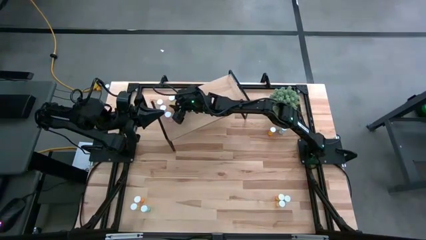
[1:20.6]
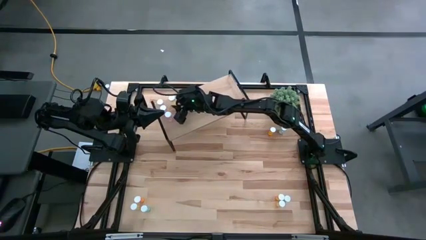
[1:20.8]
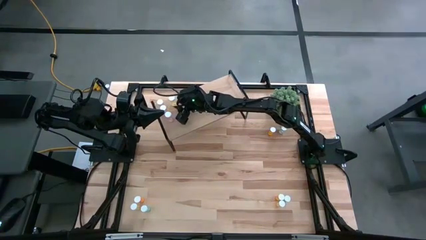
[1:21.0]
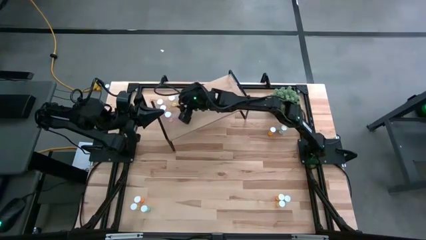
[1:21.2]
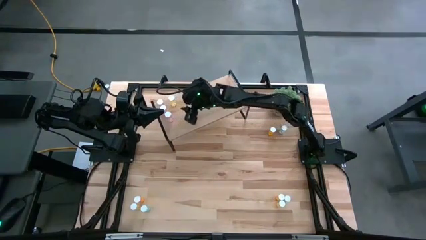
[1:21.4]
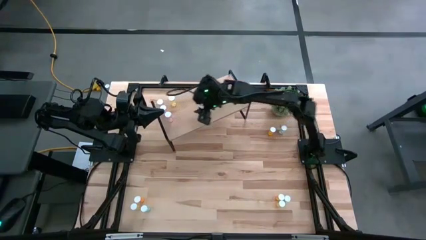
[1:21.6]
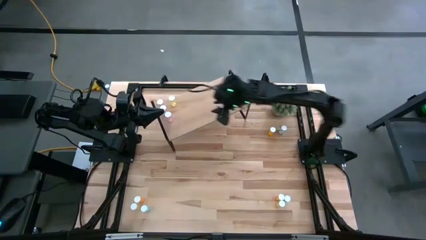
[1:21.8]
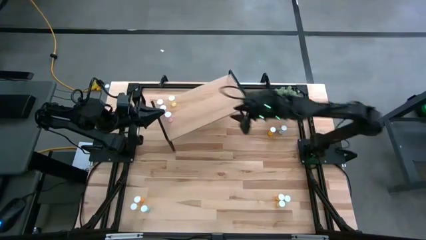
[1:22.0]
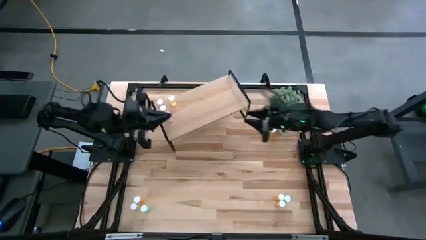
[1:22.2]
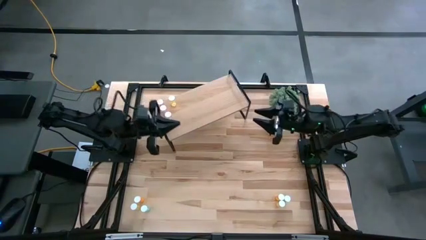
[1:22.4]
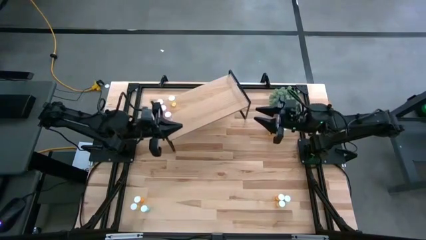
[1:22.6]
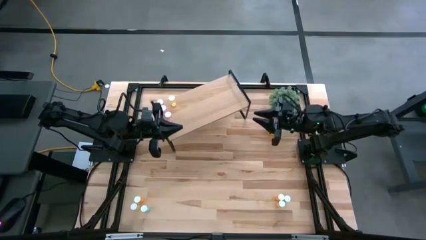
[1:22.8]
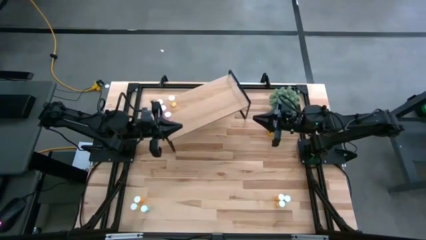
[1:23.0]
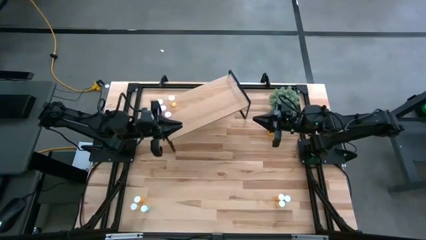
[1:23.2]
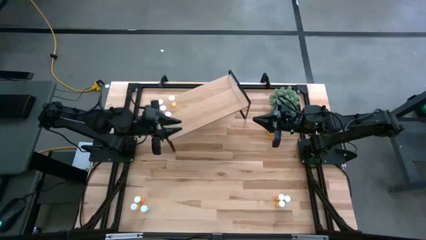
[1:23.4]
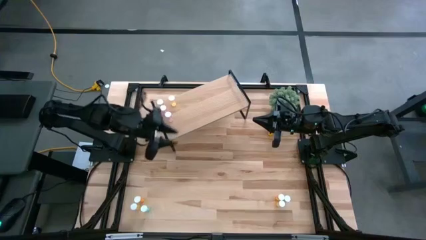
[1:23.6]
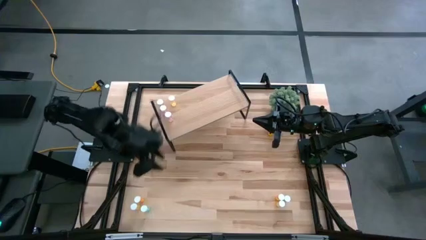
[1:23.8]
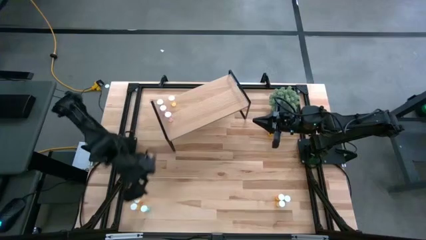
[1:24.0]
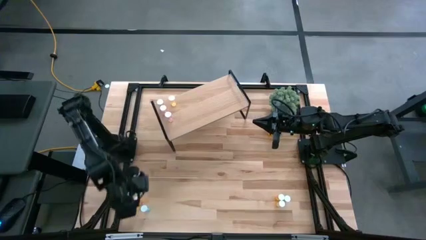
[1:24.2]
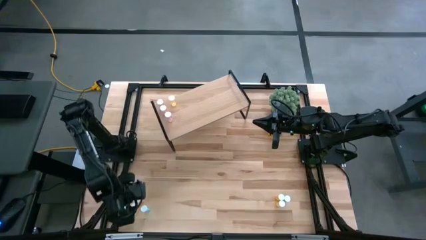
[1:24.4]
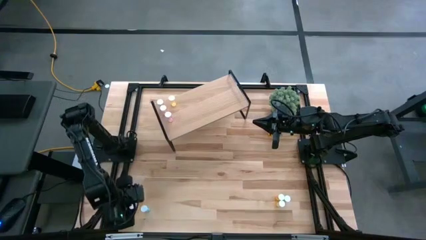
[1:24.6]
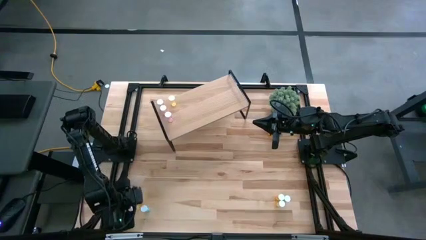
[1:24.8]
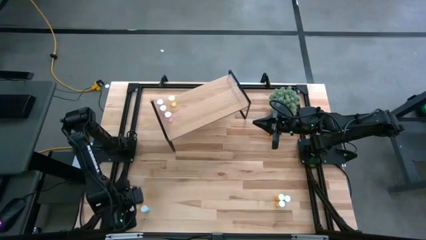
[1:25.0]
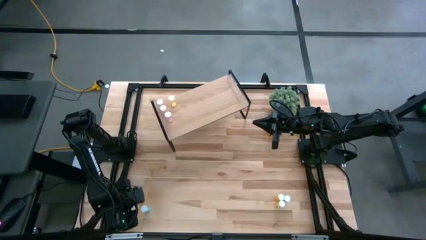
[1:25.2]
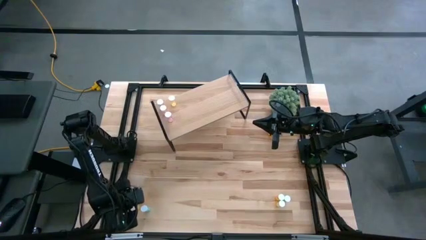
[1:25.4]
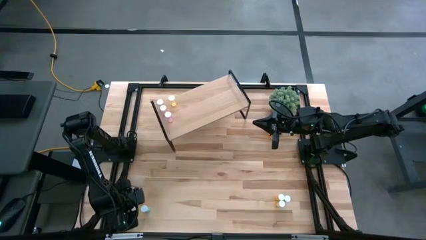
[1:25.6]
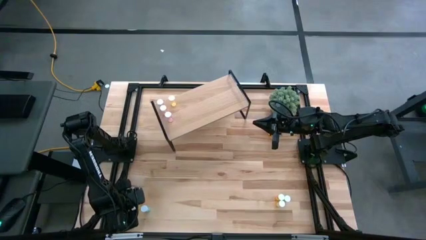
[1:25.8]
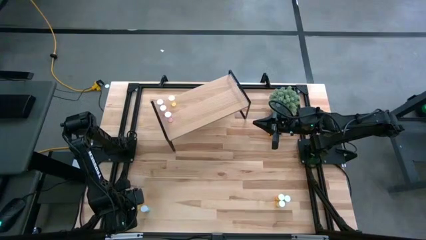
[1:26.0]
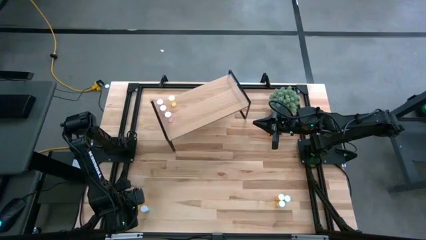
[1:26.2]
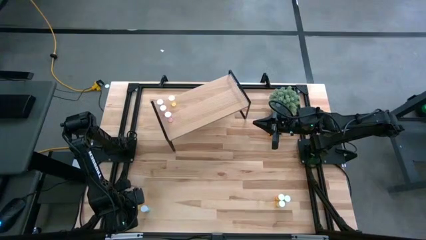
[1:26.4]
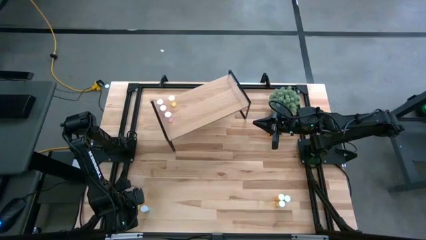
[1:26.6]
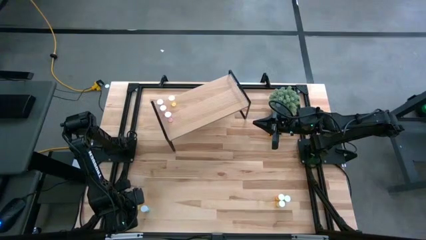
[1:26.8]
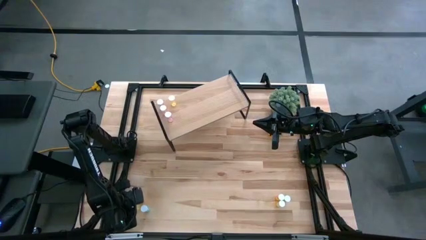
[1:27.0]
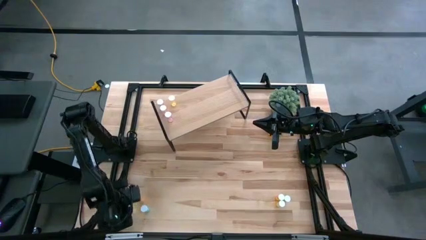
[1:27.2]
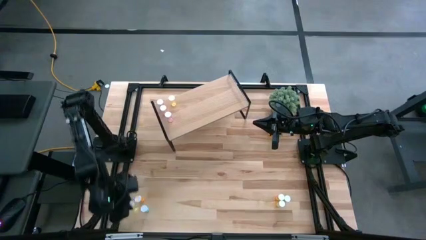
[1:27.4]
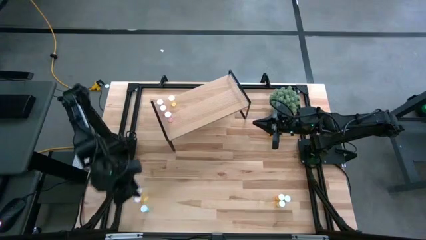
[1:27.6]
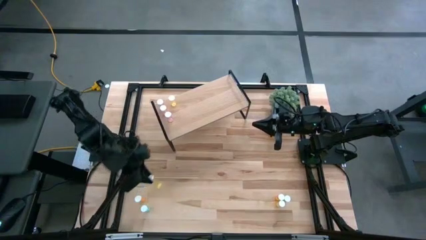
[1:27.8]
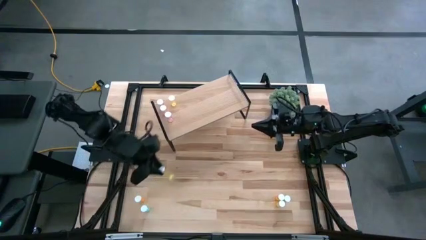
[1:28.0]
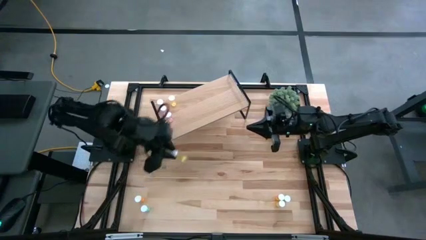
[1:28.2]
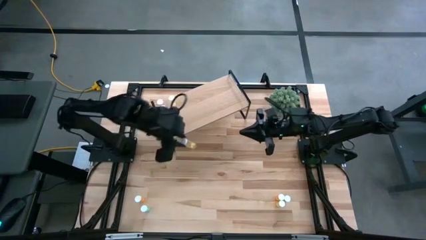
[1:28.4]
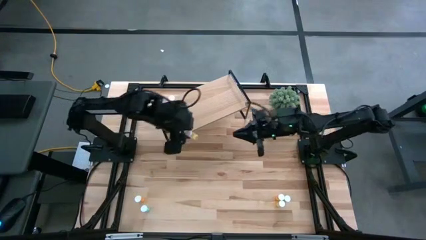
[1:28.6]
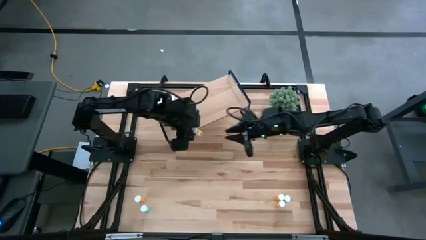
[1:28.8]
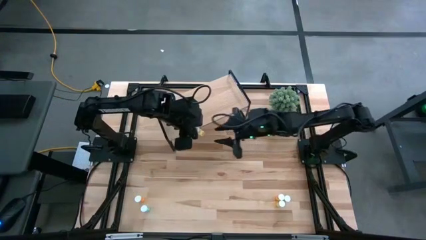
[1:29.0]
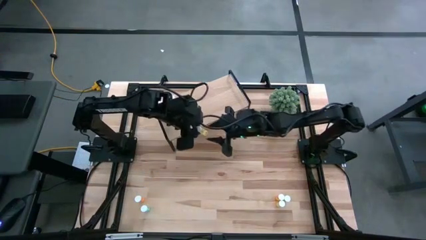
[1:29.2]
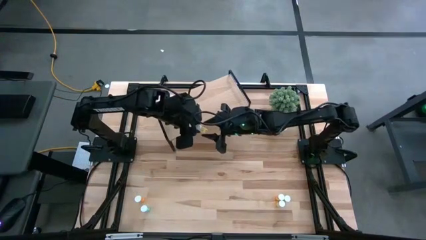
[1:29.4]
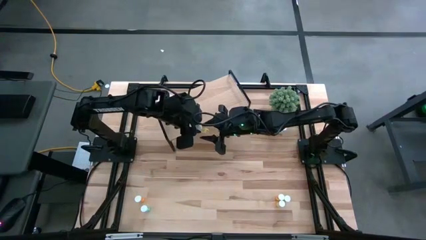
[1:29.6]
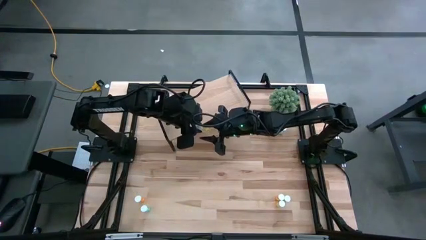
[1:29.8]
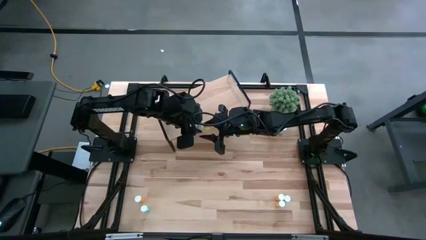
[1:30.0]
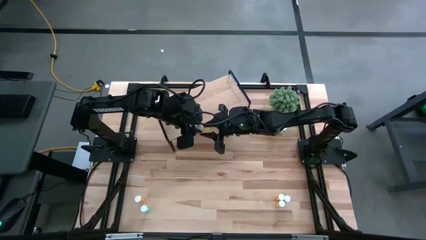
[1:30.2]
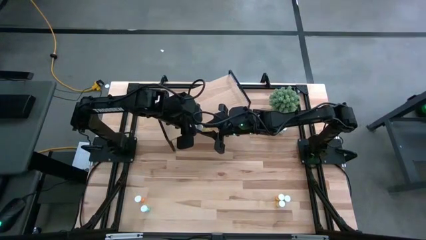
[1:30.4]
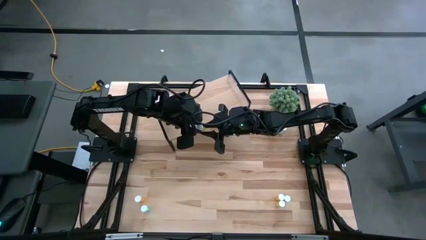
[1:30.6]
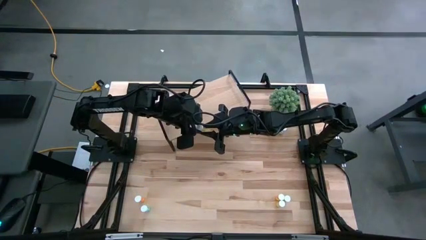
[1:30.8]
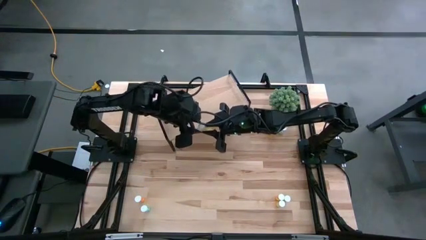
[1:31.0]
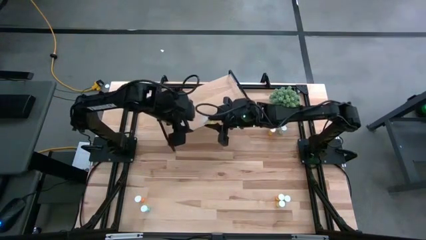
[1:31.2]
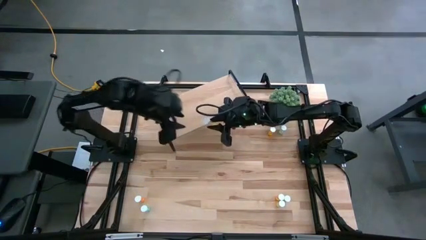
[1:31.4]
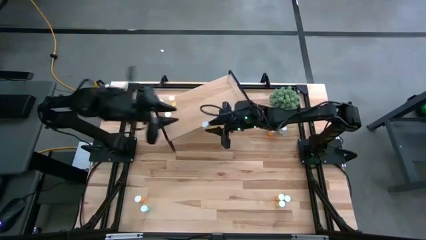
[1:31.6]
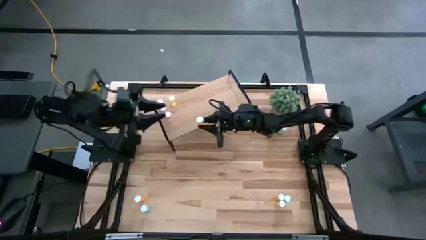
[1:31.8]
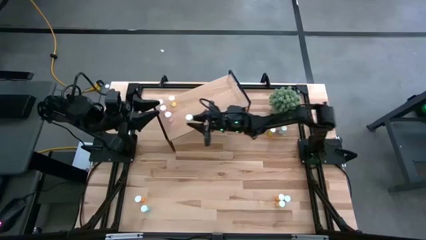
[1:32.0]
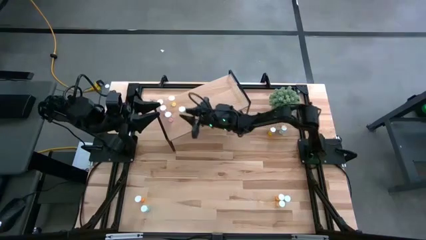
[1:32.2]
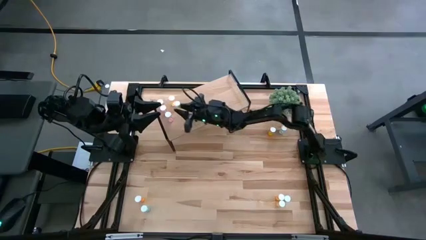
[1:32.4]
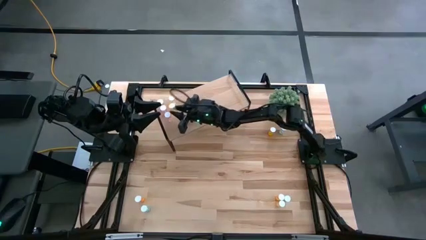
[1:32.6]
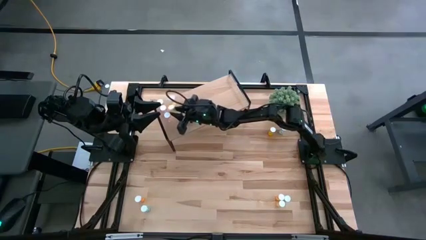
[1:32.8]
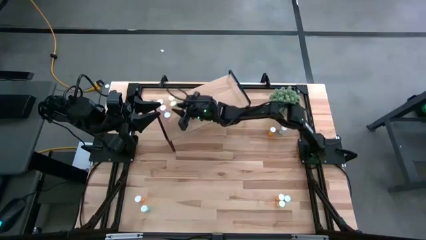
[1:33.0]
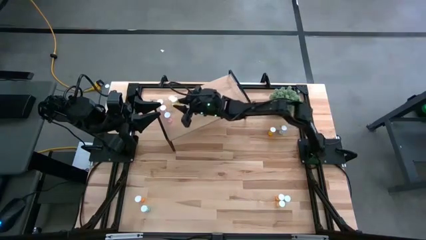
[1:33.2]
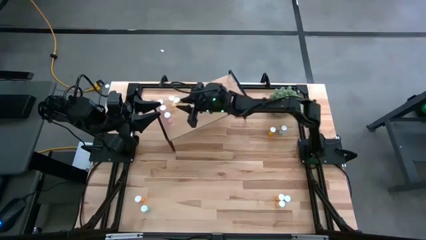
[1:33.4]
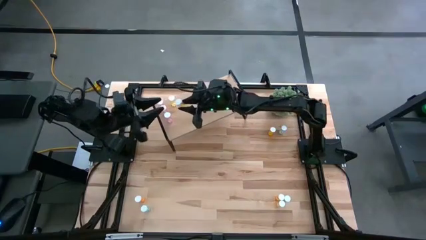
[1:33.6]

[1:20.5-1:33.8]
Task: Pick and place medicine bottles onto shelf by color
Put the left yellow pill bottle on the shelf aligned with the other yellow pill bottle

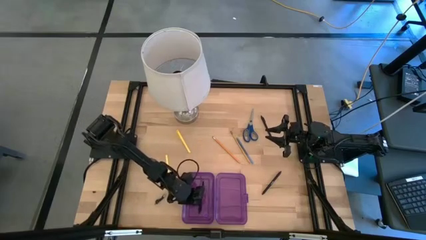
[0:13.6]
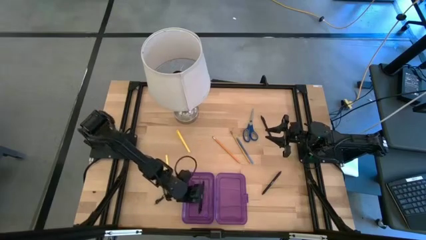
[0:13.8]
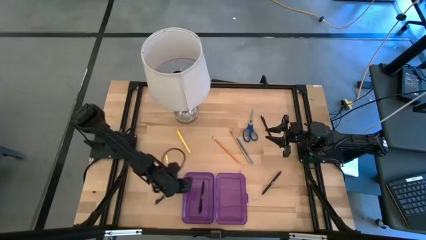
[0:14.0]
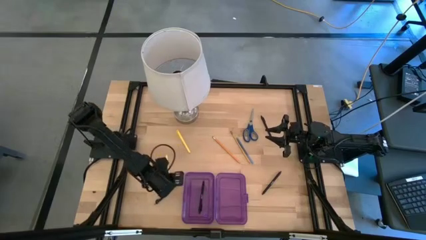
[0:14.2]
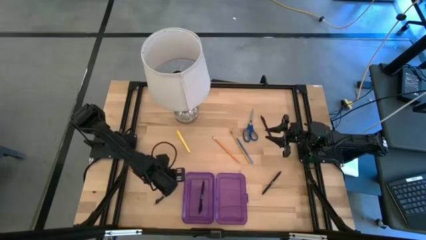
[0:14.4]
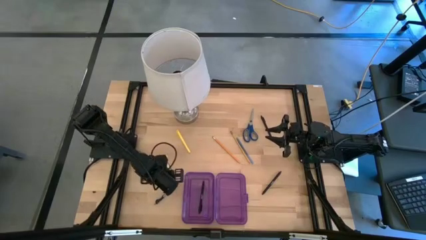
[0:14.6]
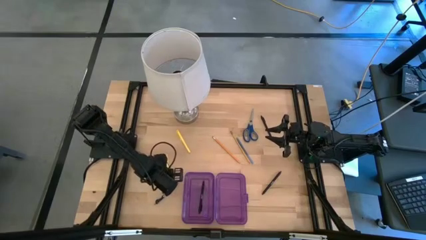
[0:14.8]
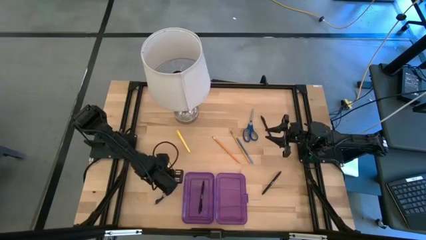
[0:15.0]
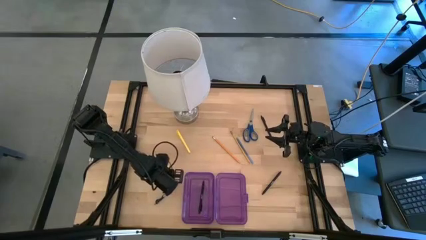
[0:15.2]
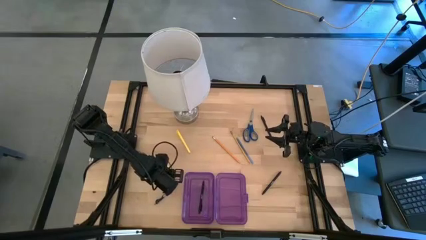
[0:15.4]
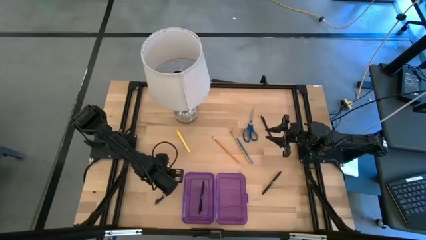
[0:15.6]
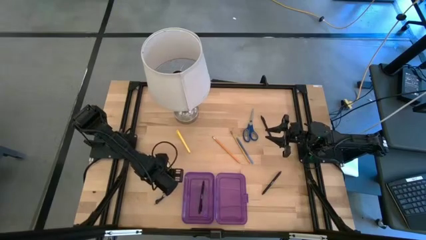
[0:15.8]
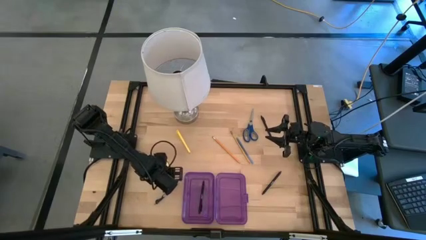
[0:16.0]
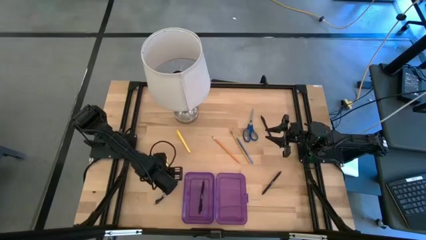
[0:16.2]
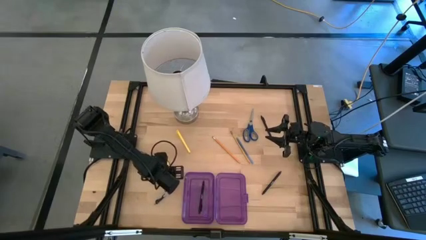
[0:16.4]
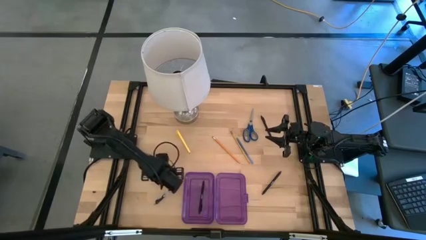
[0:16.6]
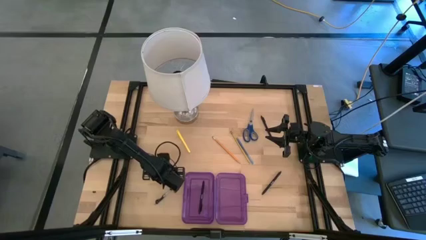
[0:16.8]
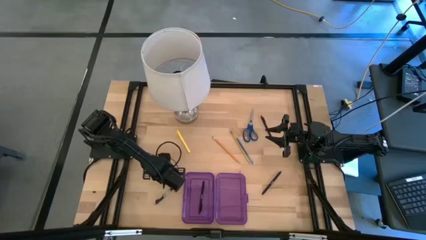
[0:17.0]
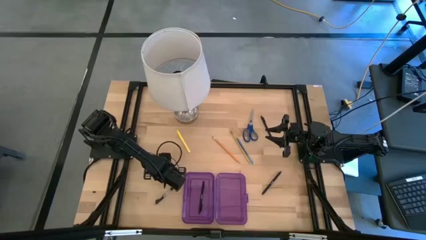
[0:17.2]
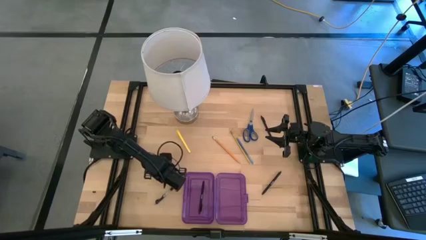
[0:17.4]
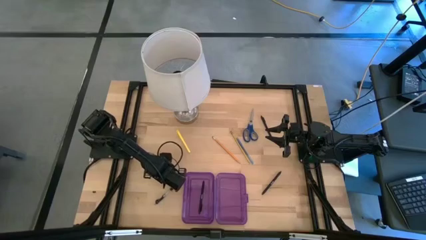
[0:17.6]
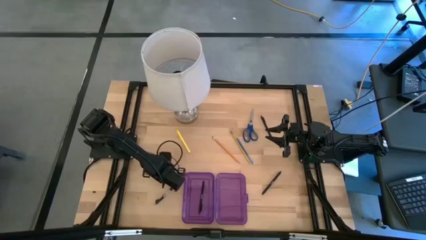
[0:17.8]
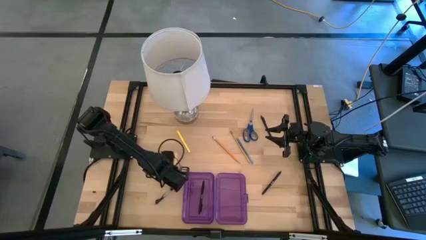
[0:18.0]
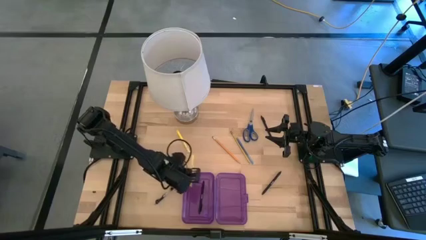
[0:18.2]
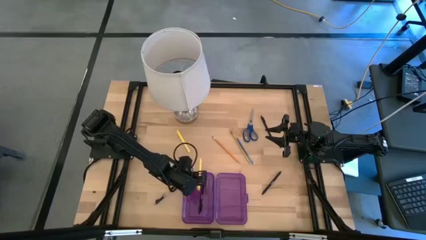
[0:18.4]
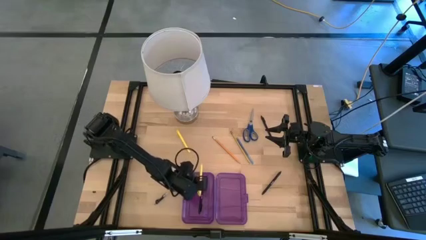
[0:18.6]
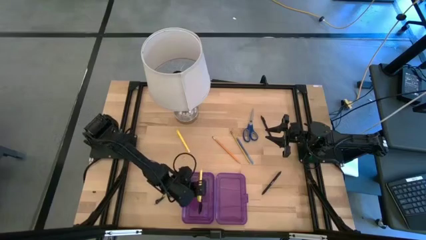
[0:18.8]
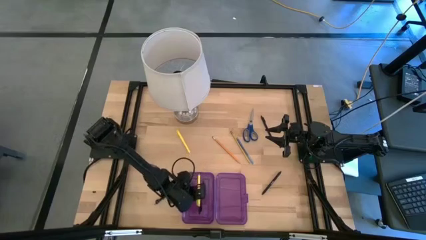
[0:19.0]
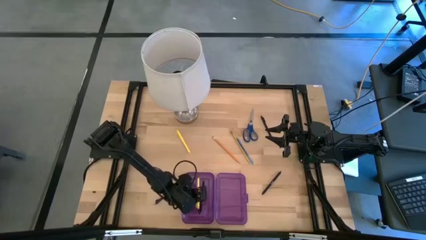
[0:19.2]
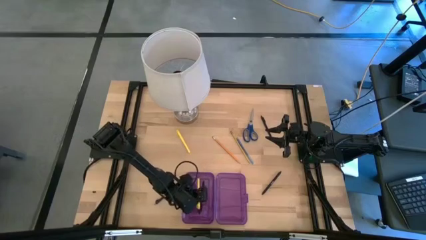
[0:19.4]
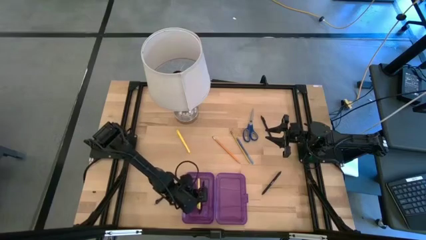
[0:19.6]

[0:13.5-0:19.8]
Task: Pick & place school supplies into a supply box
Put the bottom yellow pen into the violet supply box
